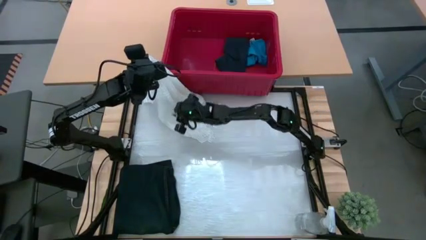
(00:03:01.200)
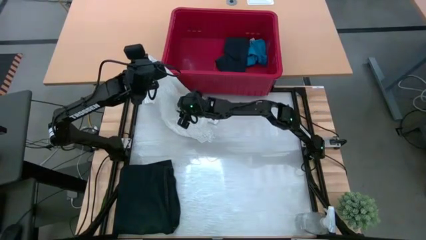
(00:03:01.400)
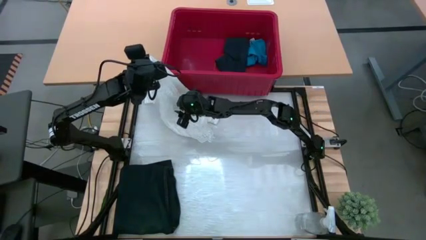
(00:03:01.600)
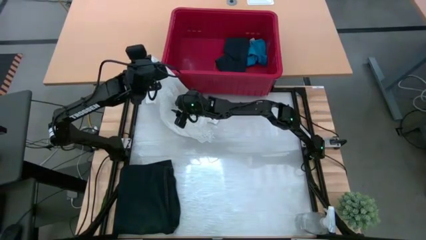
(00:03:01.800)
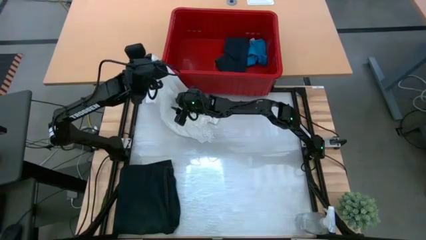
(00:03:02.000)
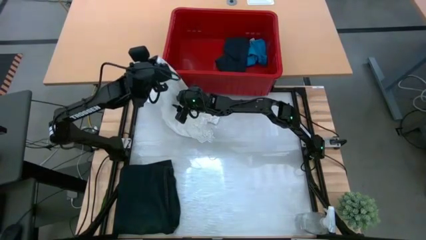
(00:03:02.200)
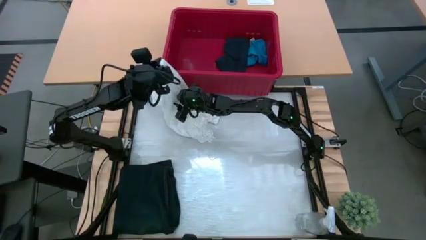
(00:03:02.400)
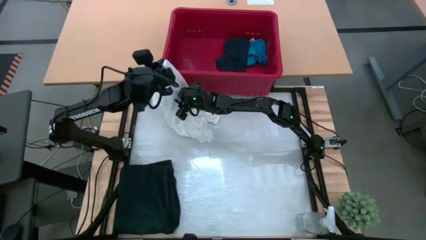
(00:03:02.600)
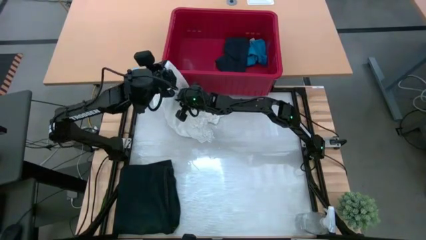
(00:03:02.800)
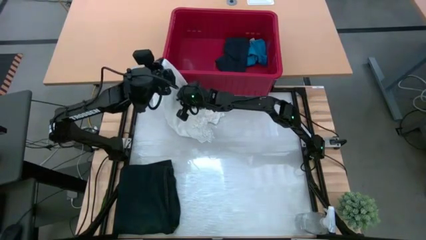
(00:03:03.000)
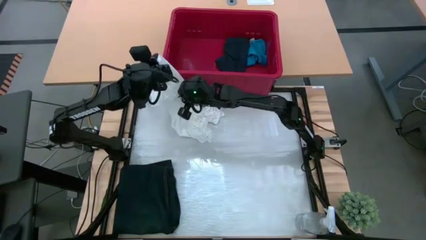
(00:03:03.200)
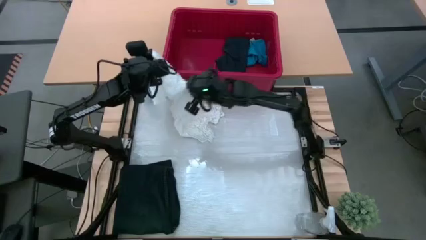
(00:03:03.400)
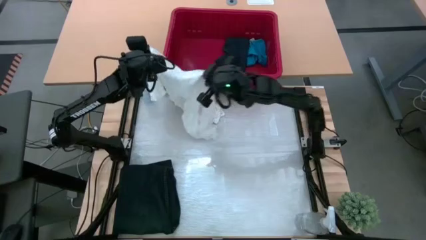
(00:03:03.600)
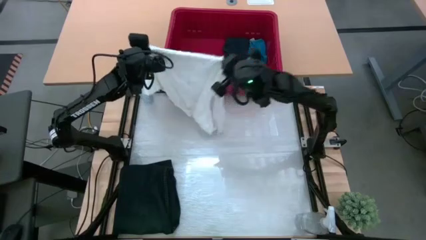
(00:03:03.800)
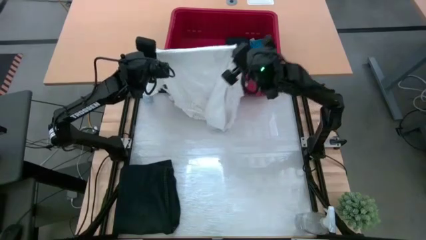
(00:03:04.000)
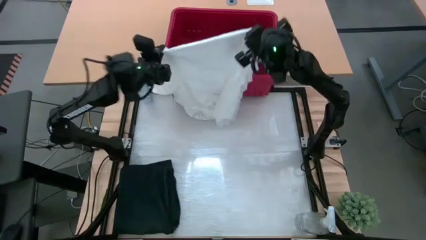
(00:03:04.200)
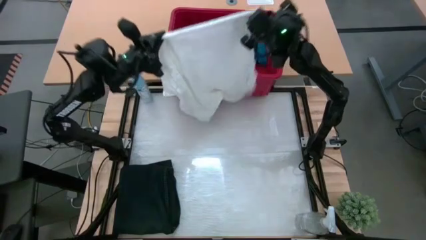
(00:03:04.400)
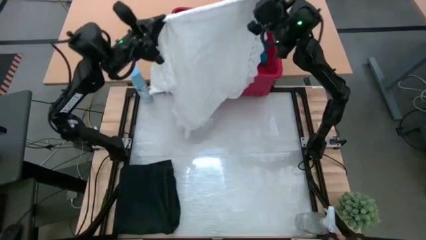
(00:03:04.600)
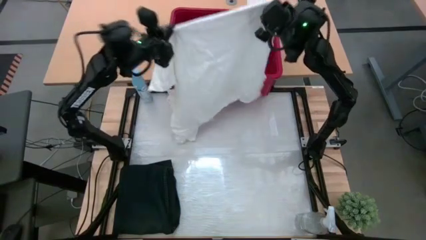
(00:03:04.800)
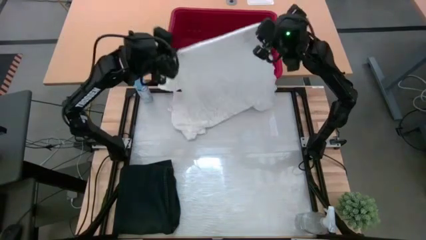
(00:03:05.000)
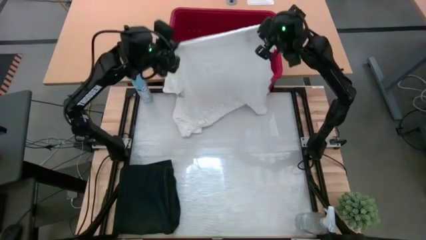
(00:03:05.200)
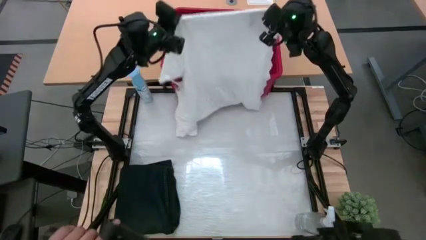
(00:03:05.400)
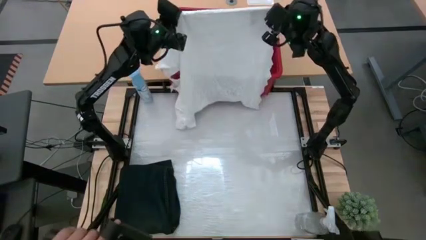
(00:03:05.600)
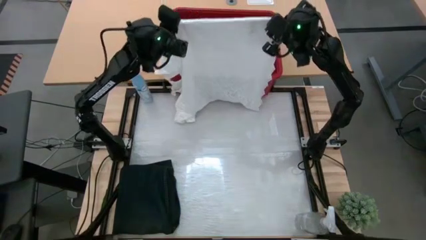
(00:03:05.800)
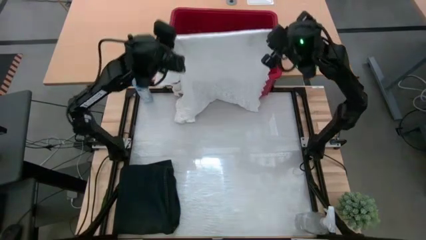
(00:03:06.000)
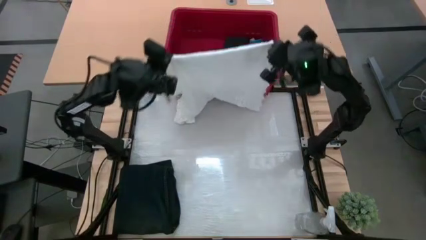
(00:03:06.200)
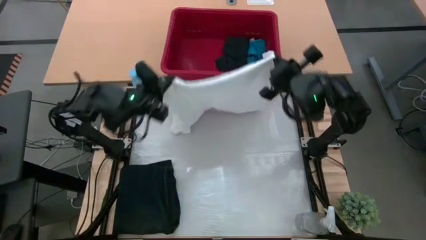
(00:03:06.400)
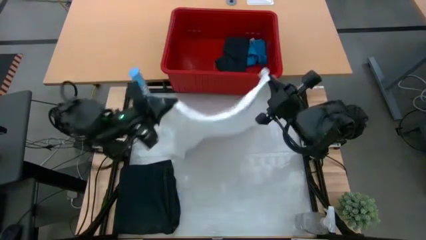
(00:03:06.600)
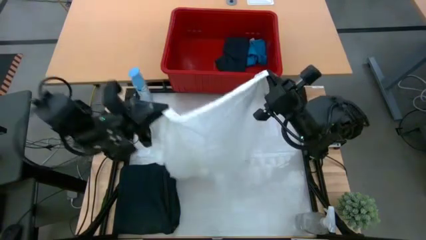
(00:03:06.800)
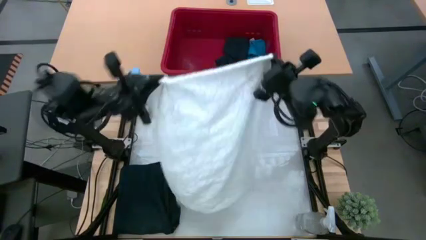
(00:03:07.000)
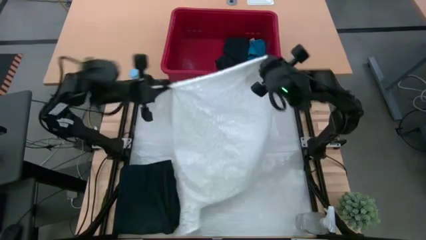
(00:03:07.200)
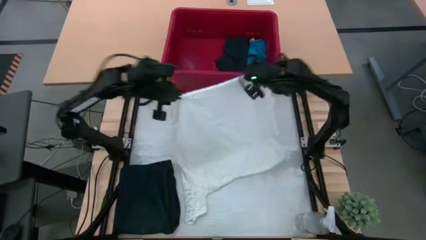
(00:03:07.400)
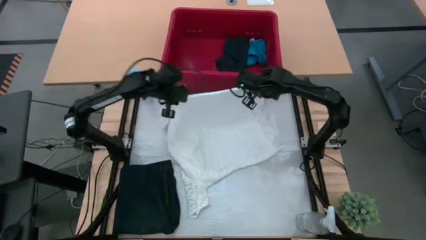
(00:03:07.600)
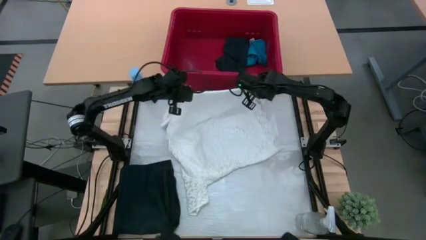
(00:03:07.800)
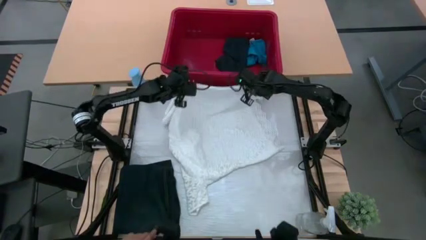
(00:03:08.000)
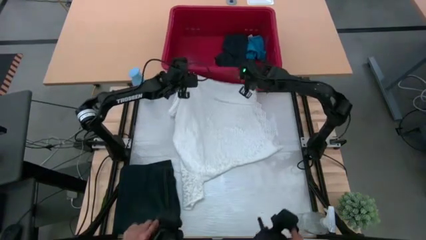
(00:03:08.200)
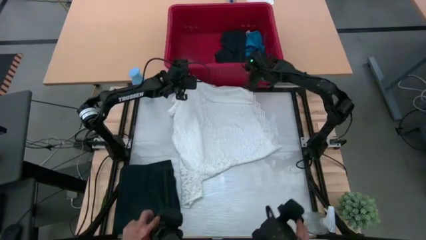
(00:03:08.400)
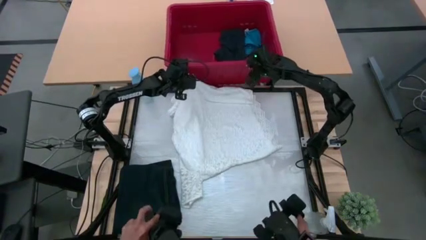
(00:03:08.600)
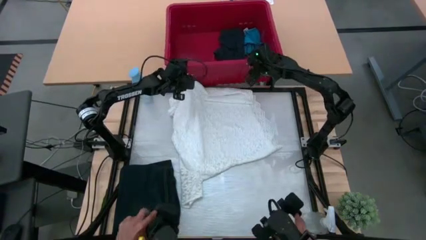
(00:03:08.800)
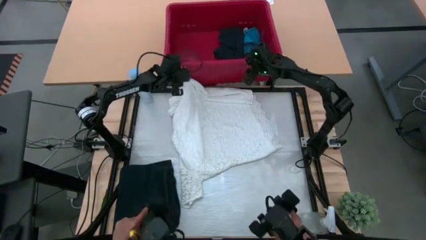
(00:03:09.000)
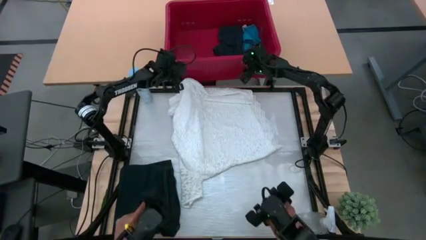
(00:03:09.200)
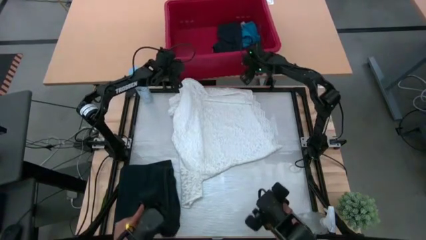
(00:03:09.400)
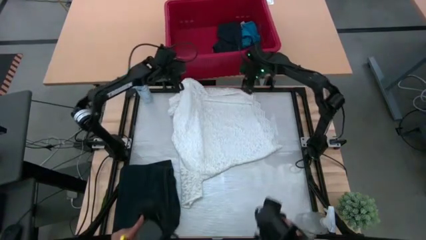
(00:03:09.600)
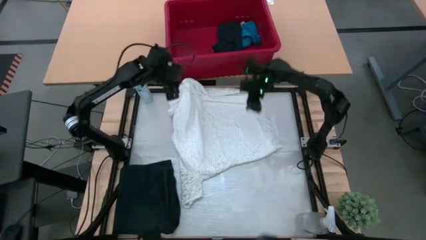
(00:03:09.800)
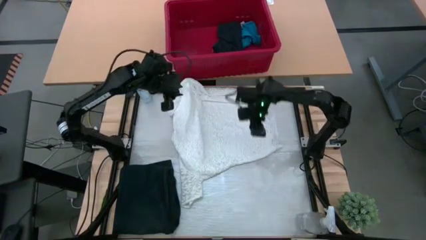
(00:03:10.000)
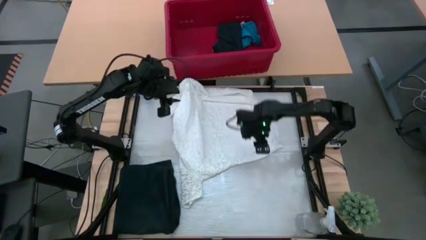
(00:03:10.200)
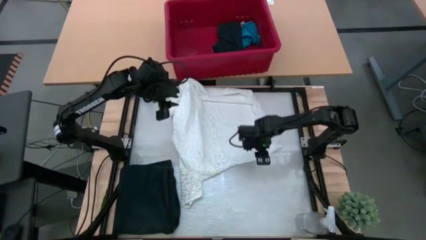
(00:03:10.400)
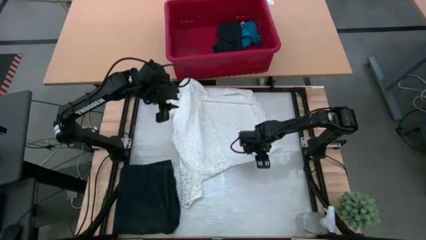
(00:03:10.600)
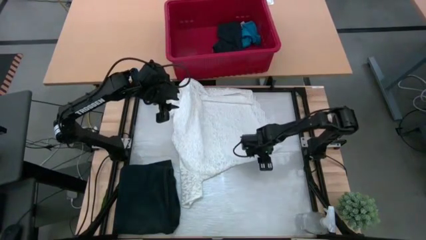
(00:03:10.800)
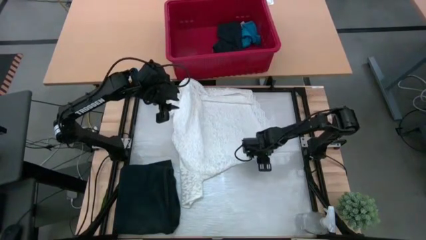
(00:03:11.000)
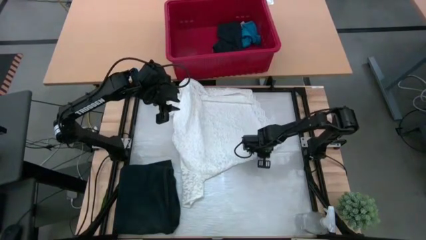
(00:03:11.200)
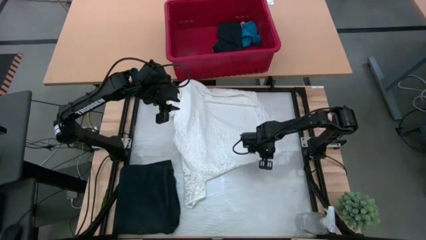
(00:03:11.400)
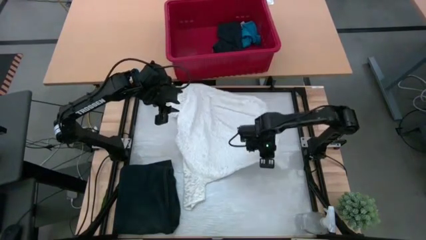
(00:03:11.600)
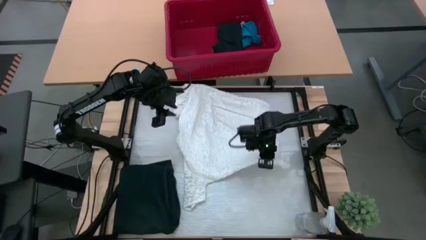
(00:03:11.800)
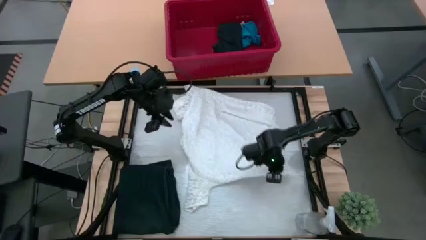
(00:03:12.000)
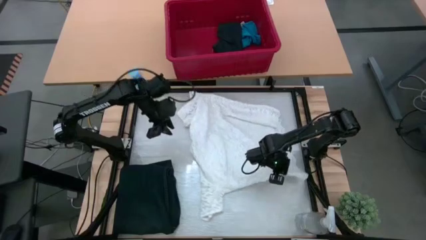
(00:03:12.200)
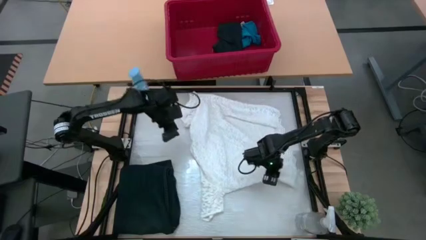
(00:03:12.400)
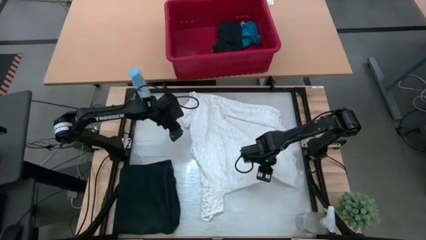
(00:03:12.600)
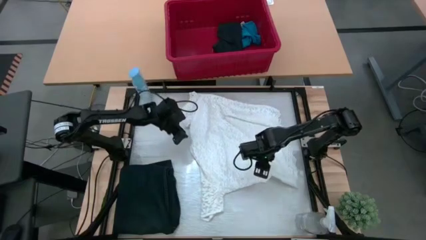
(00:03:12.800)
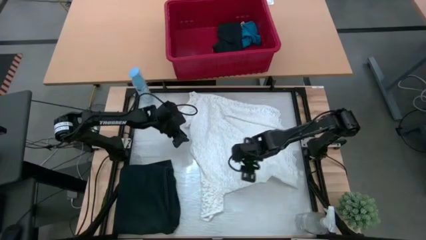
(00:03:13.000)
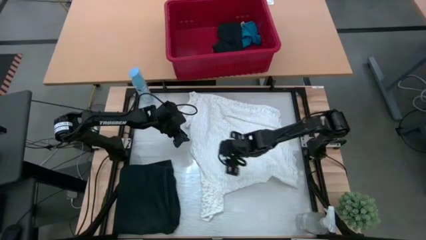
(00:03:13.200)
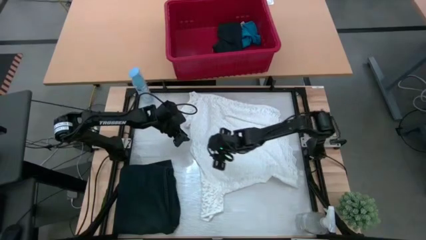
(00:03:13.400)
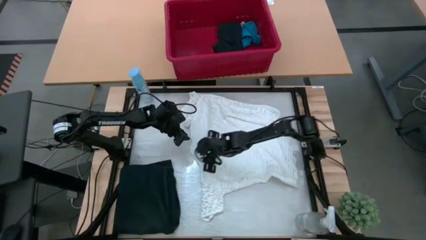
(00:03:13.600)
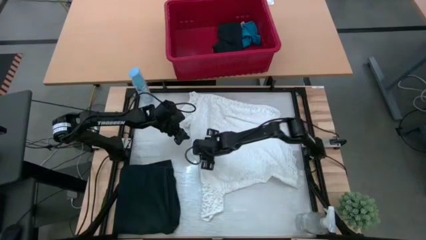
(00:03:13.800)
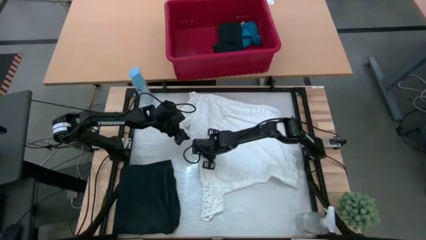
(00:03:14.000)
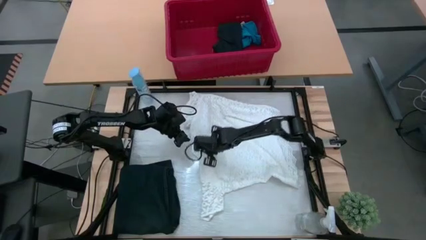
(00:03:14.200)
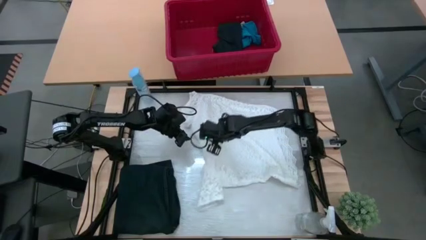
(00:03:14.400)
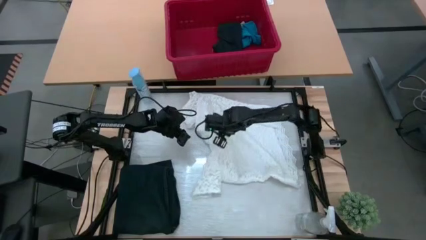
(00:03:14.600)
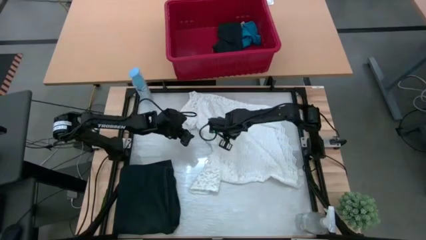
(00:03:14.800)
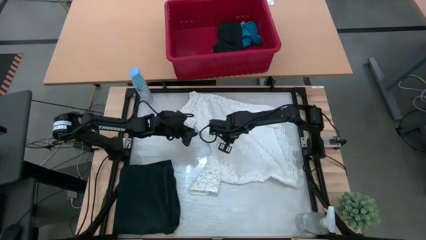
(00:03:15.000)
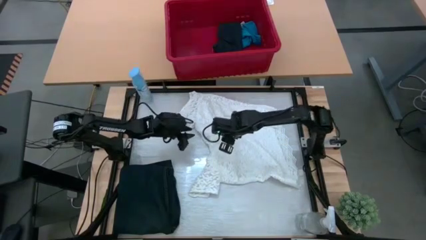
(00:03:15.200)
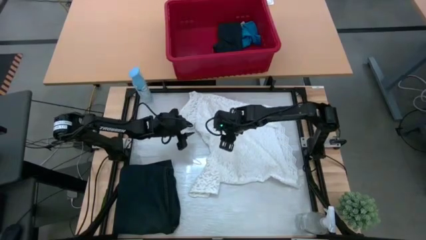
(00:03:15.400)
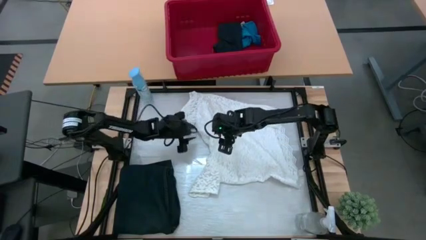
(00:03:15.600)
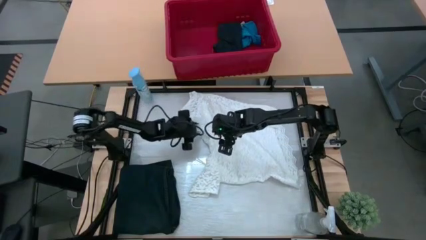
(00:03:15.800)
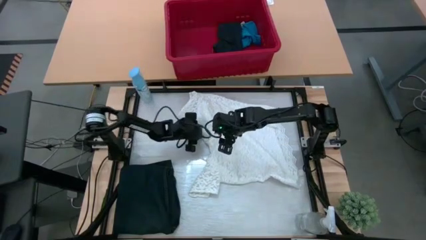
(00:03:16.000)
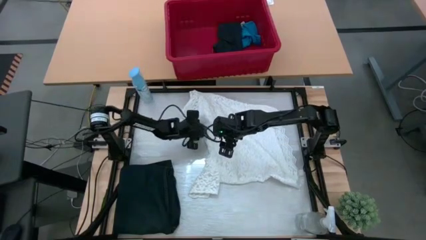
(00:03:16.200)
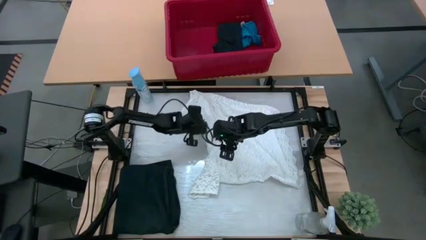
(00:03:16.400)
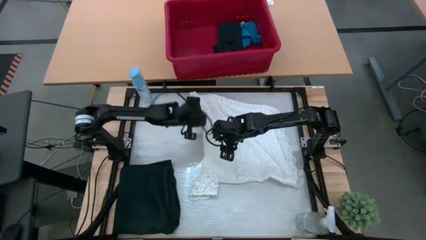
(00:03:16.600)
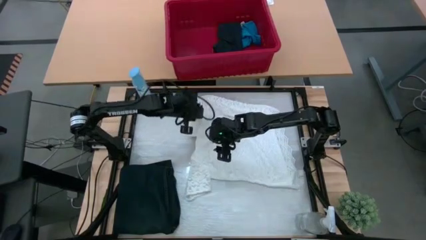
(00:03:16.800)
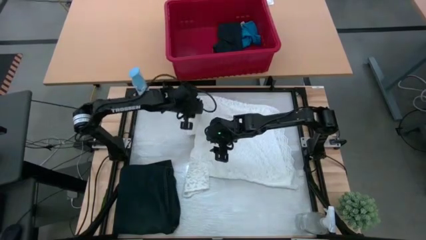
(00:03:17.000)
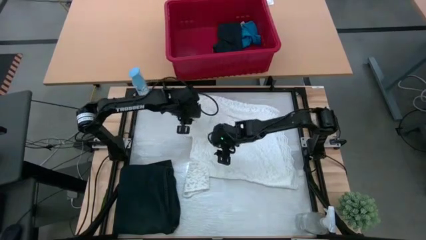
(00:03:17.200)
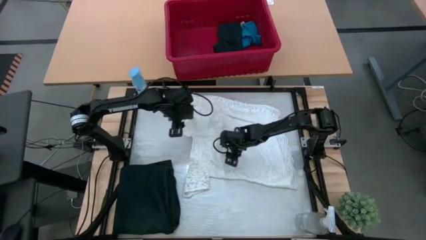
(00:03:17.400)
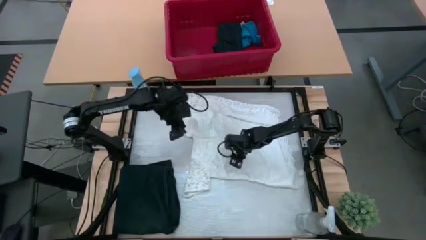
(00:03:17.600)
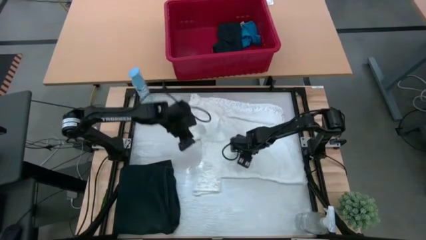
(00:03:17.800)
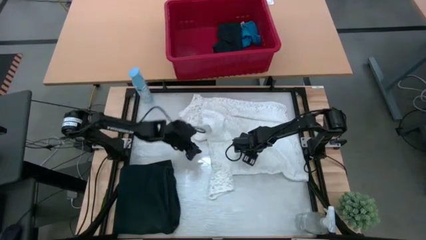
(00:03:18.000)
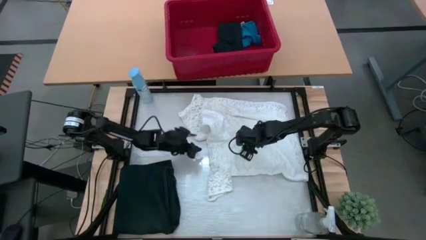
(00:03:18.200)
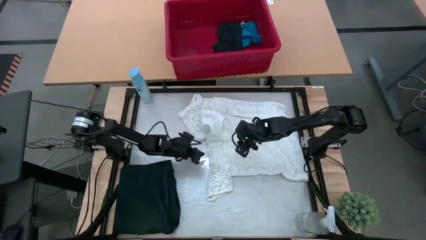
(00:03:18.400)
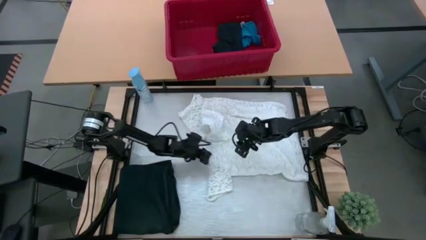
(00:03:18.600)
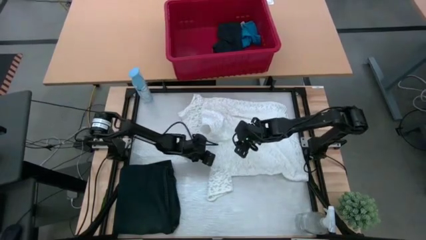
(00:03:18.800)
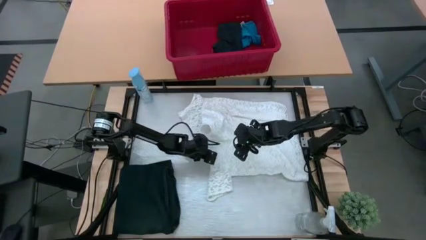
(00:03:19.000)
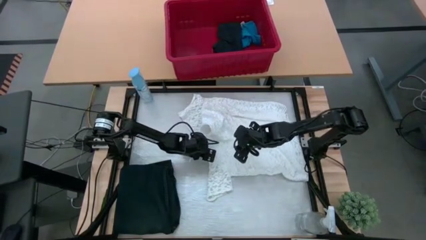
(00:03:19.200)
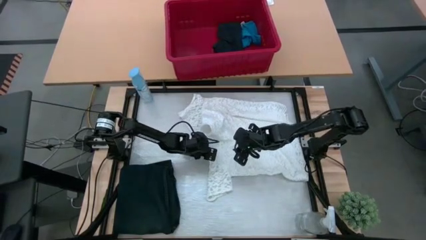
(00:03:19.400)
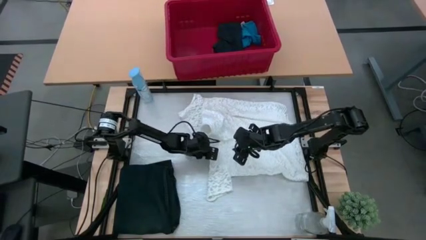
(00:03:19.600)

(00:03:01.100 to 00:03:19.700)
Task: Fold Laundry from Bin
Fold the white dress from the red bin
